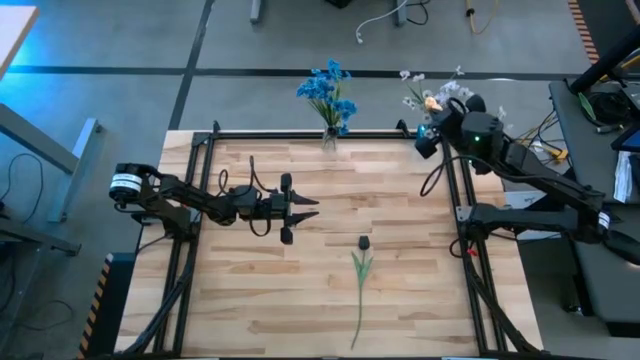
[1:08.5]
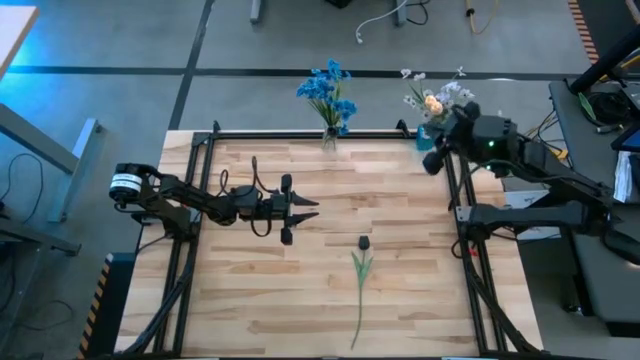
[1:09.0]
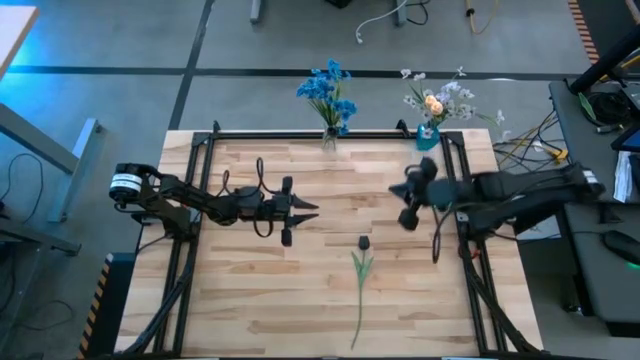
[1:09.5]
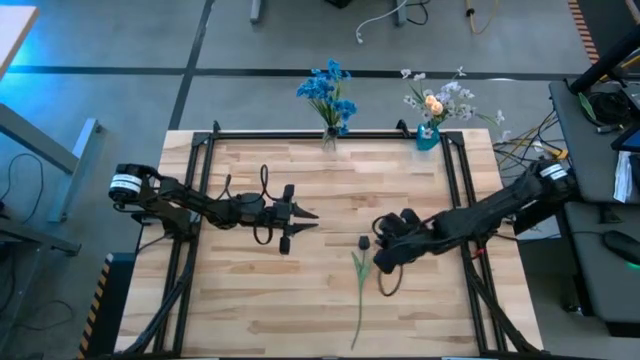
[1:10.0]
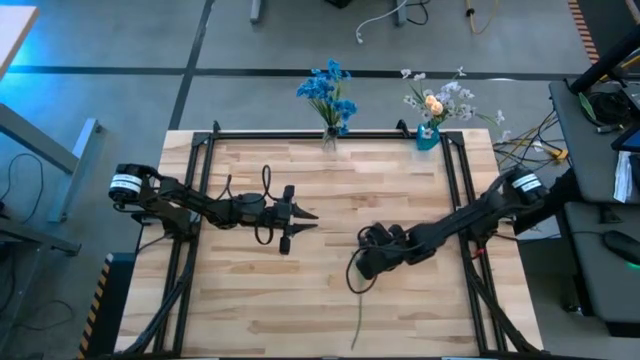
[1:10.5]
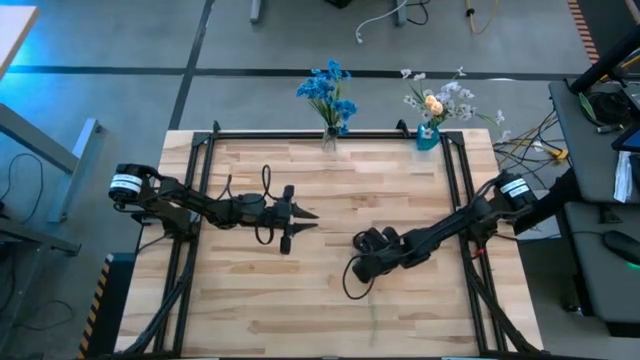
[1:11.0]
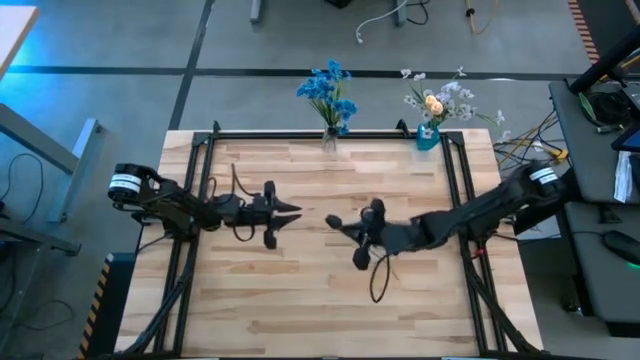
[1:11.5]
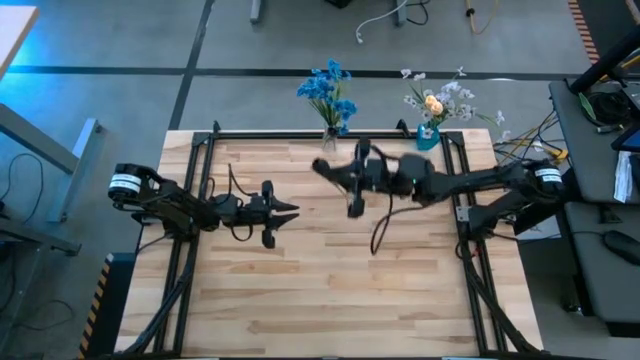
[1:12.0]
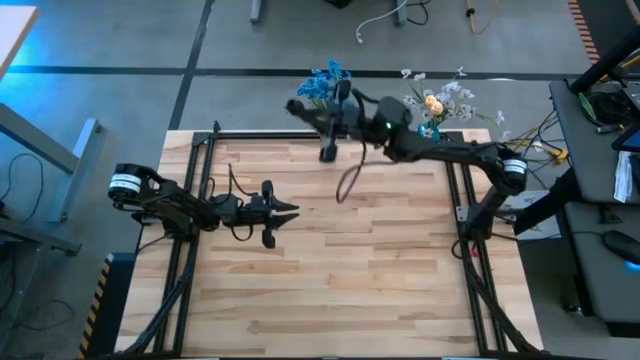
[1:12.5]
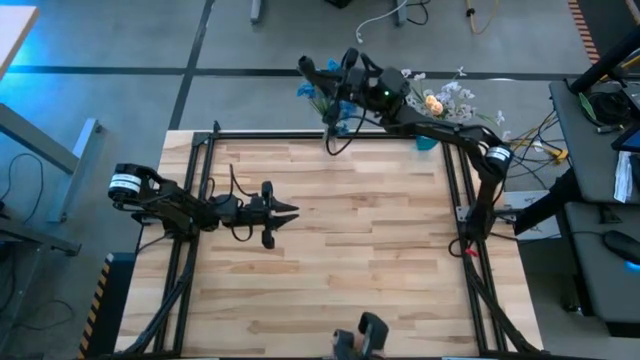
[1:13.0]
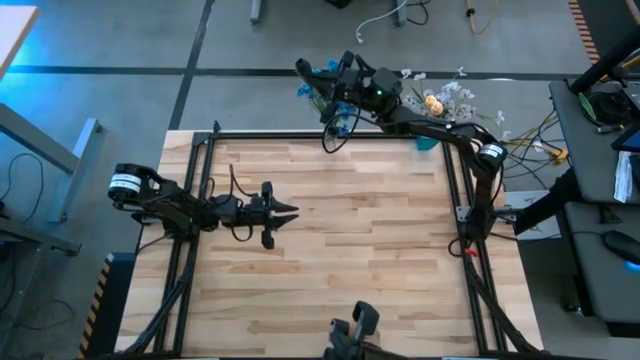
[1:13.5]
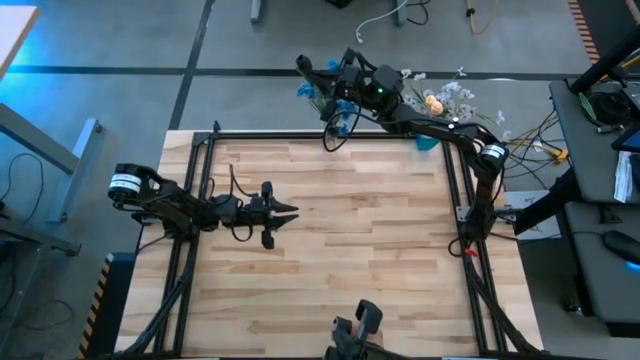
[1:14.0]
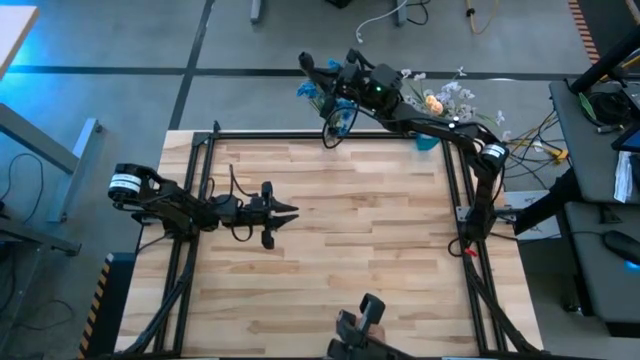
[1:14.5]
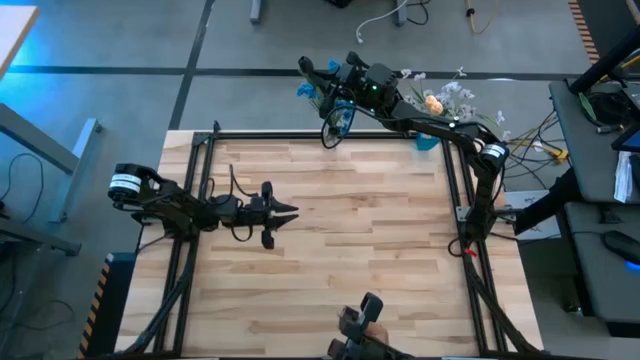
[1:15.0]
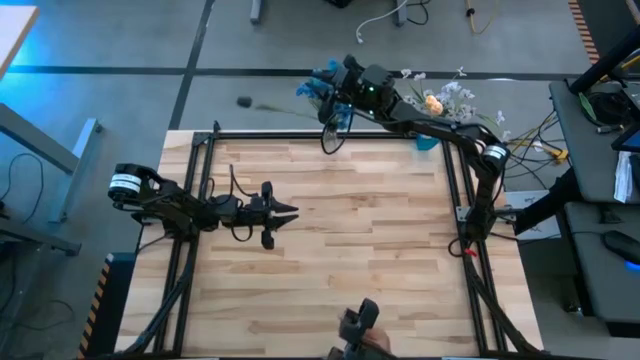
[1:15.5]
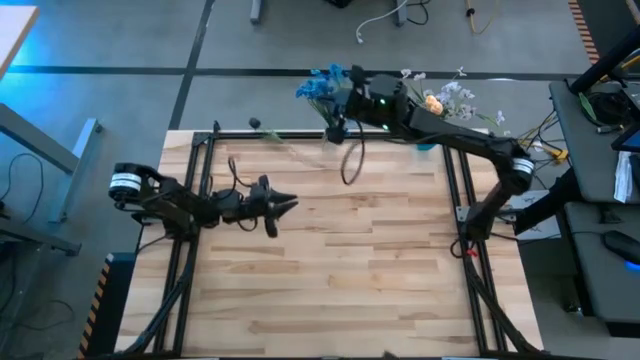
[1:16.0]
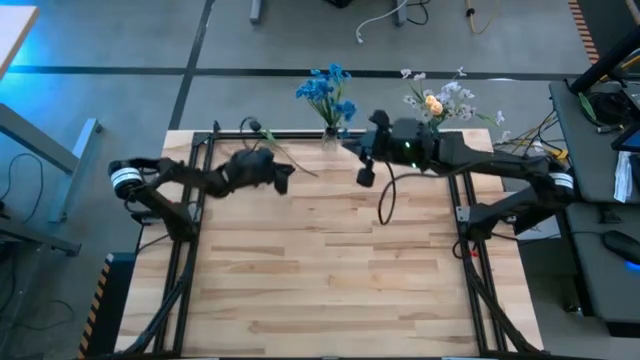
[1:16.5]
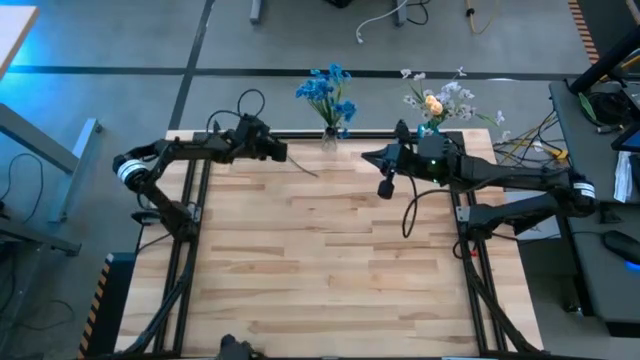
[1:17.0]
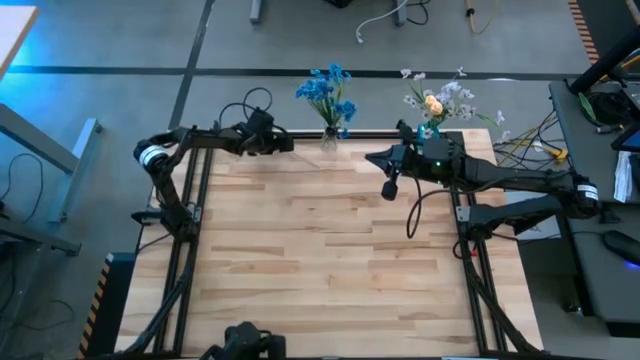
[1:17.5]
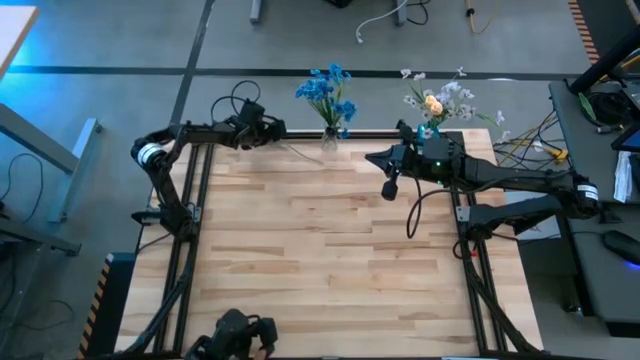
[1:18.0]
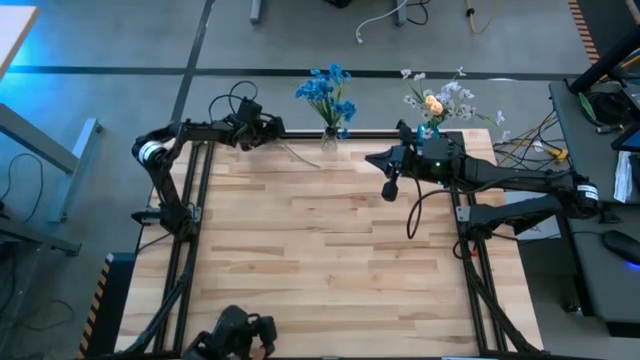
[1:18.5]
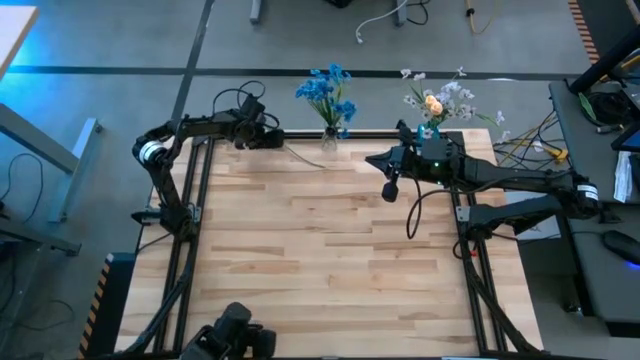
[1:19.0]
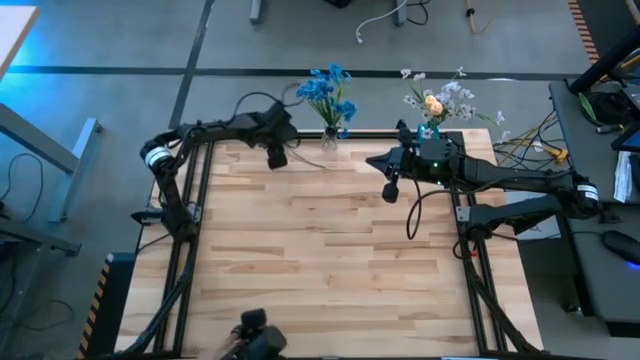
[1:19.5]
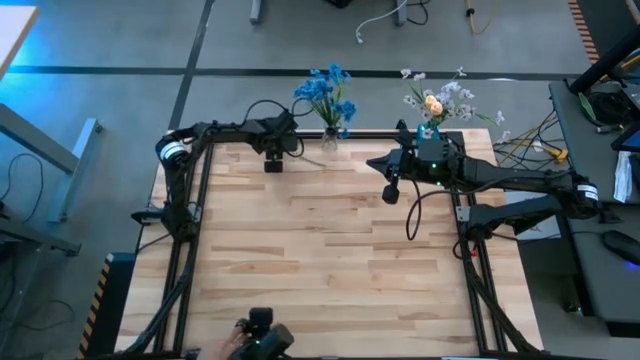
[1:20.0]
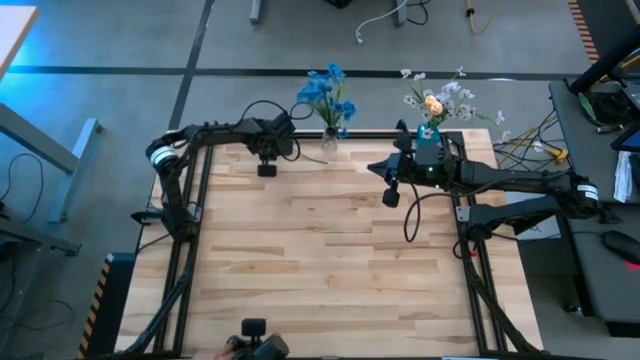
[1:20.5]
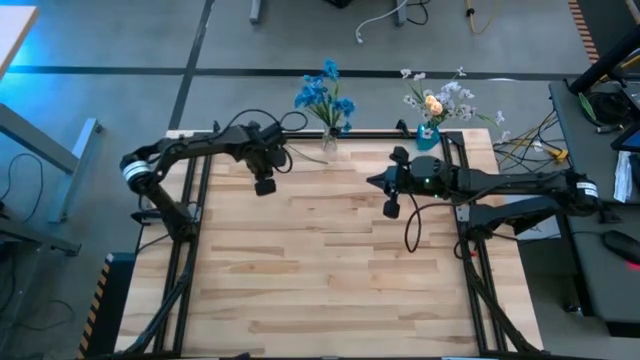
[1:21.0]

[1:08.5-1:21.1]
Task: Sort flowers into vase by color
Put the black tulip into the transparent vase

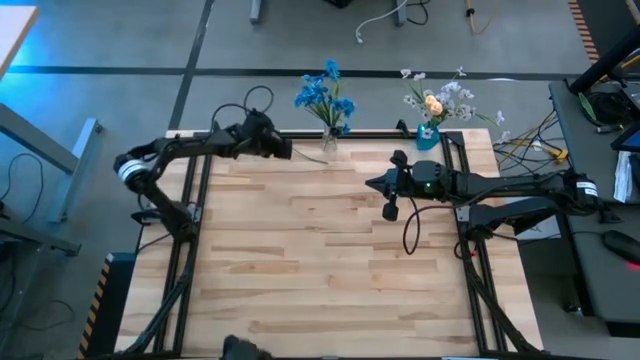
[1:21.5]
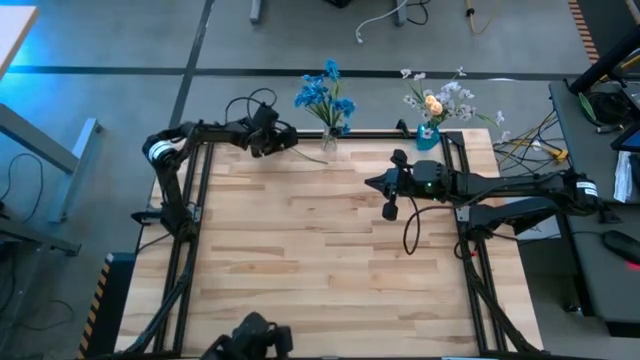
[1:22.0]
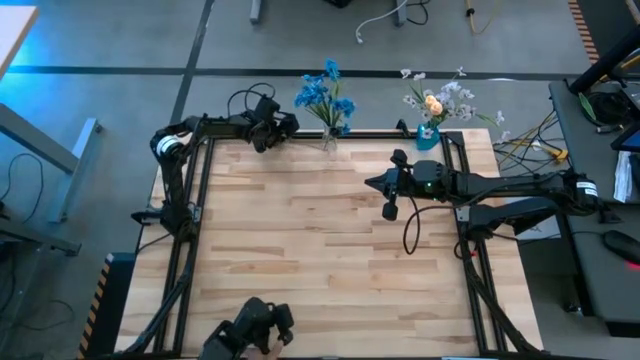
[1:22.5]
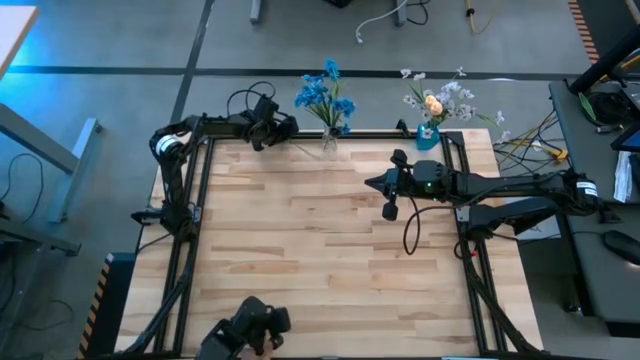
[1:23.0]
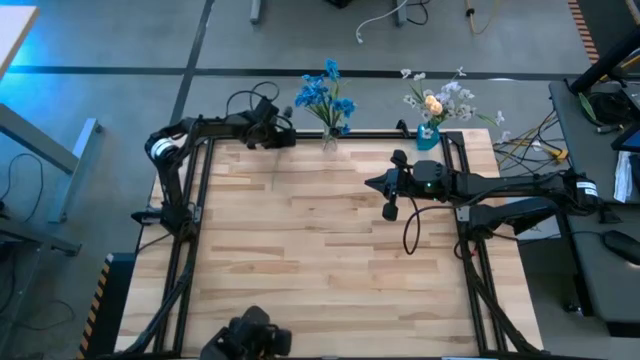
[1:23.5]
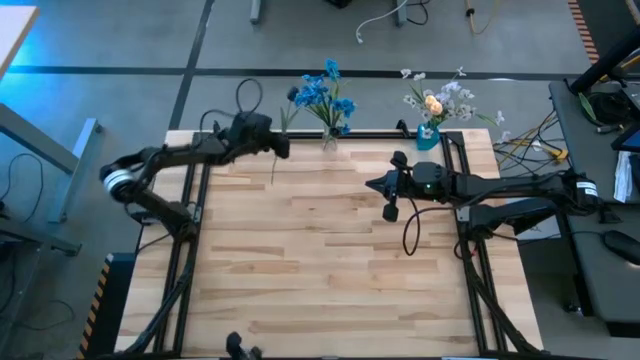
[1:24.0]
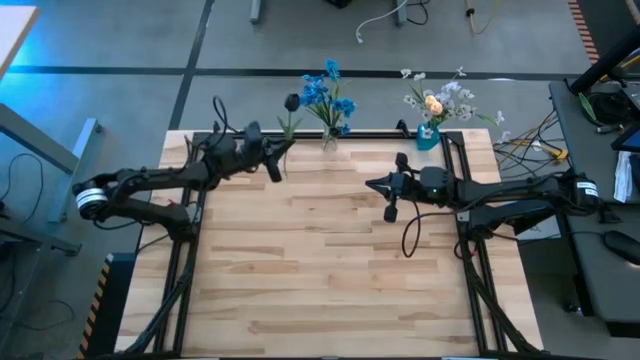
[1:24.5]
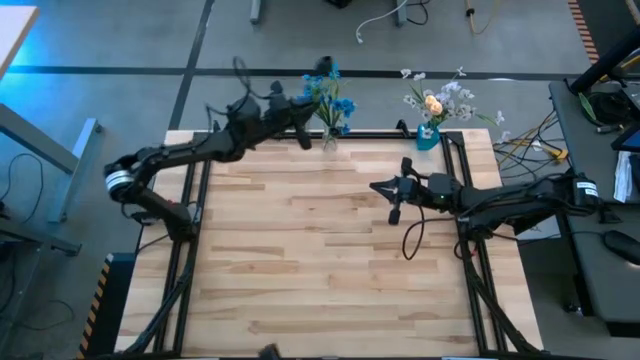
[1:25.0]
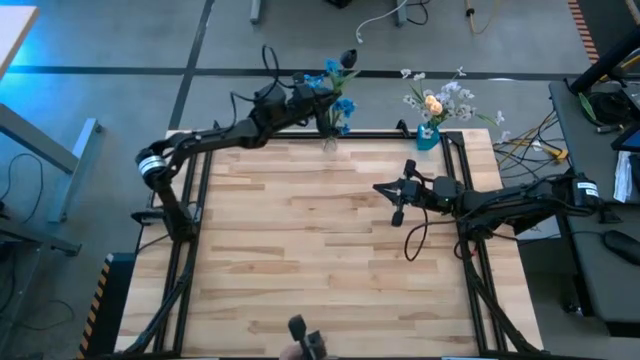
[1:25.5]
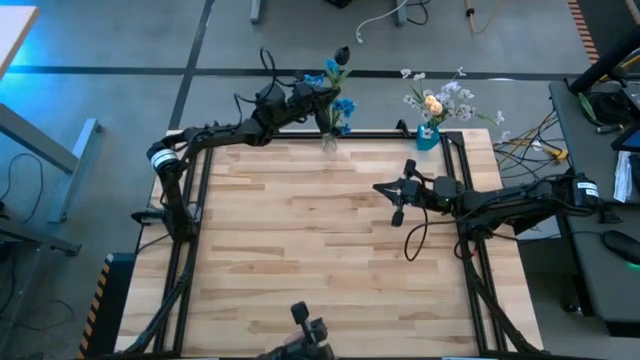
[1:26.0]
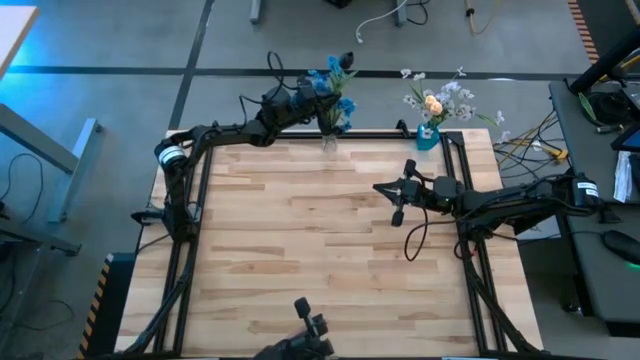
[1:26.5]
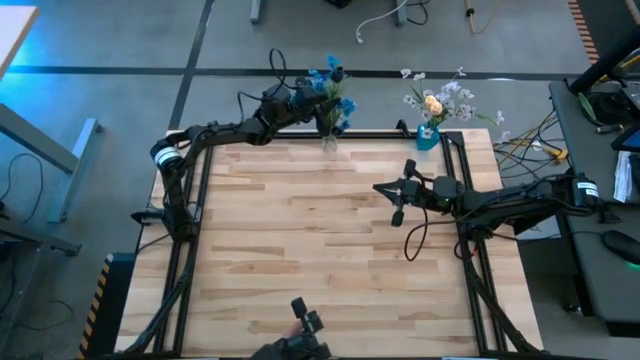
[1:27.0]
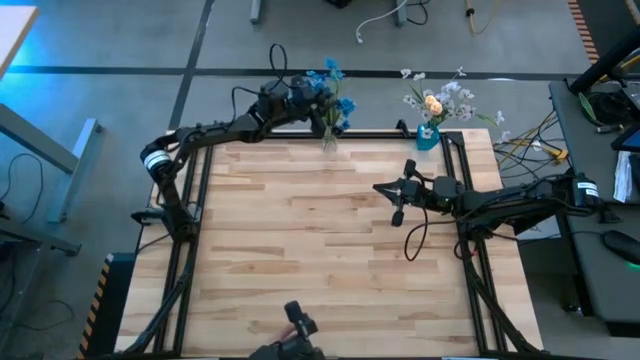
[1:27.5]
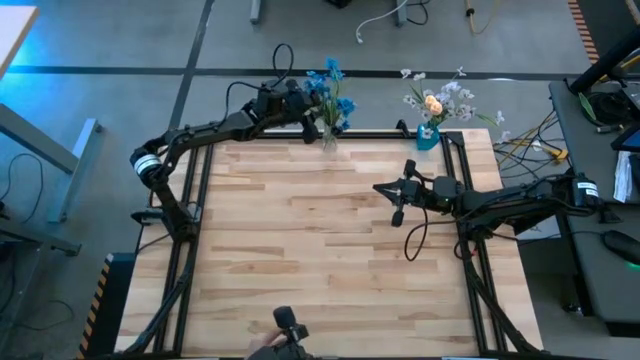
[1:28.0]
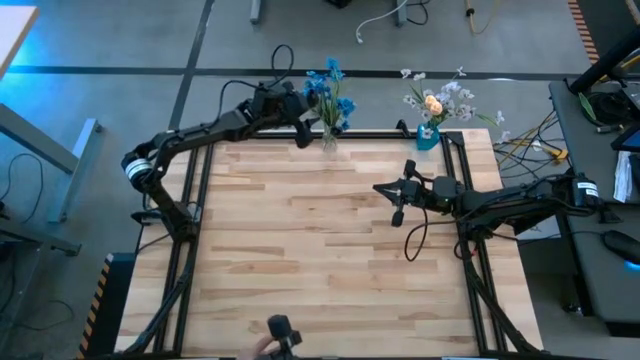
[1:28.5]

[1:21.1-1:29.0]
Put the black tulip into the transparent vase
